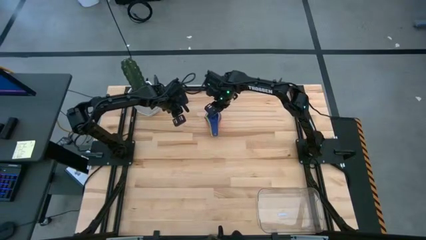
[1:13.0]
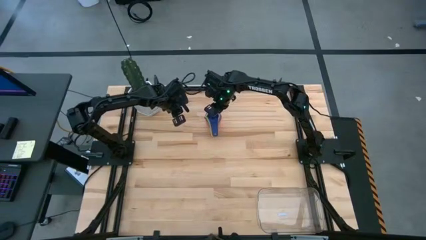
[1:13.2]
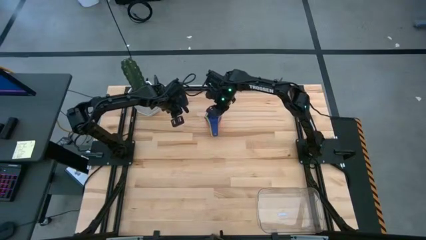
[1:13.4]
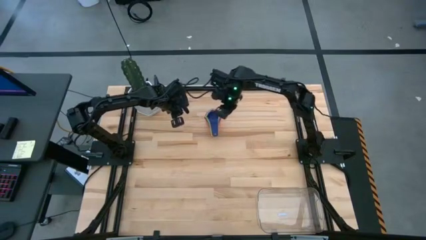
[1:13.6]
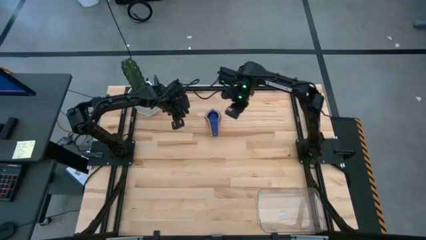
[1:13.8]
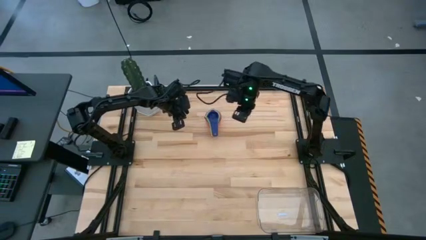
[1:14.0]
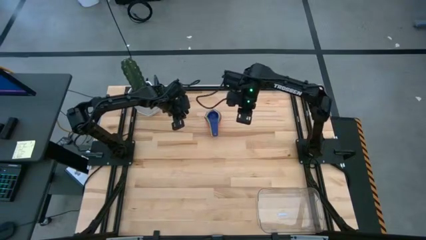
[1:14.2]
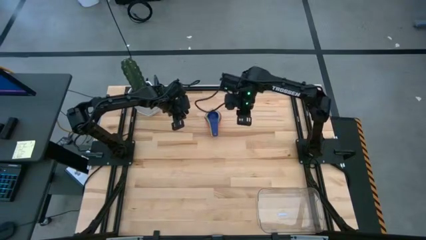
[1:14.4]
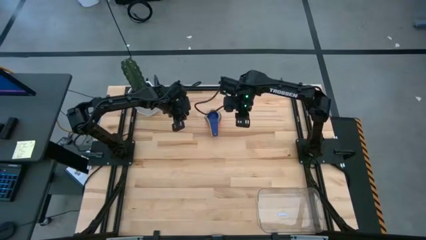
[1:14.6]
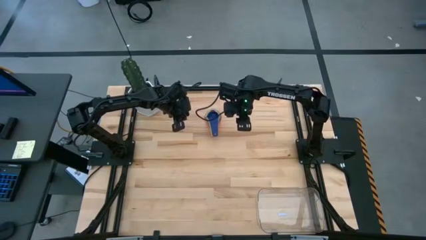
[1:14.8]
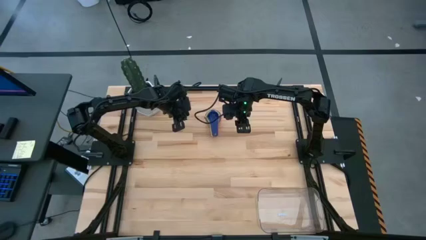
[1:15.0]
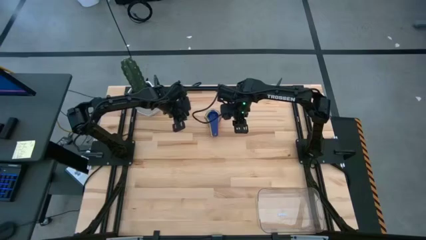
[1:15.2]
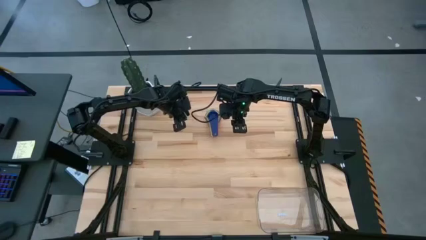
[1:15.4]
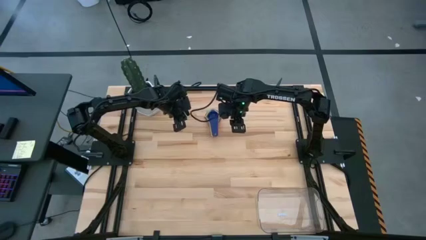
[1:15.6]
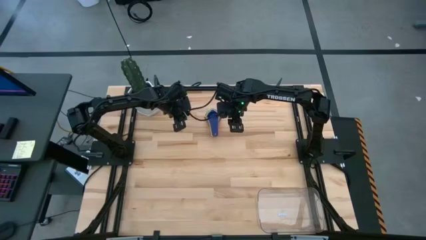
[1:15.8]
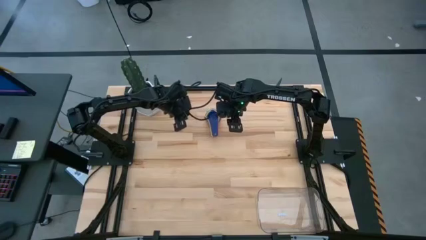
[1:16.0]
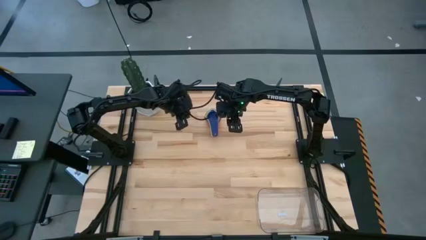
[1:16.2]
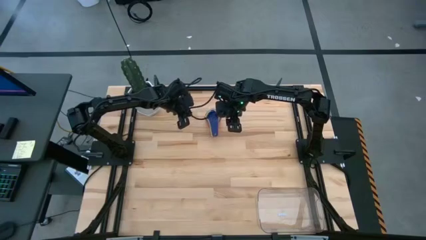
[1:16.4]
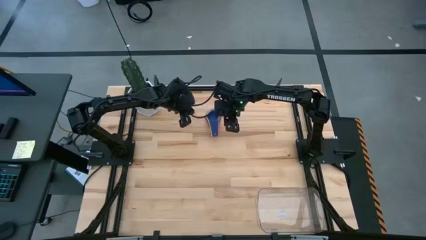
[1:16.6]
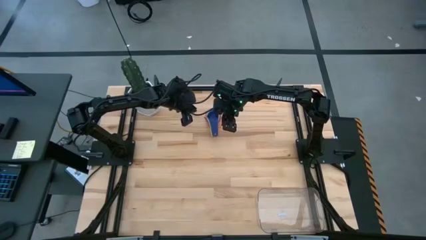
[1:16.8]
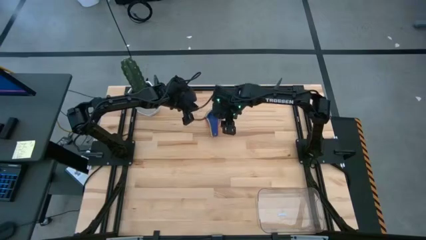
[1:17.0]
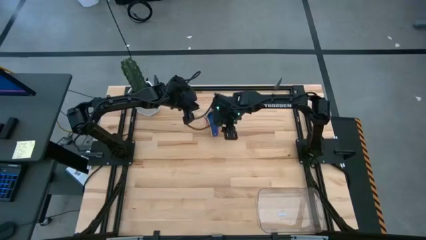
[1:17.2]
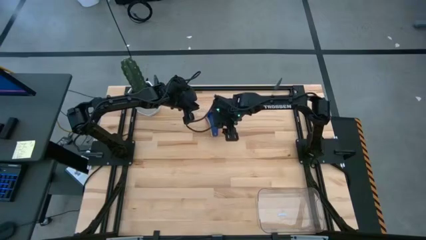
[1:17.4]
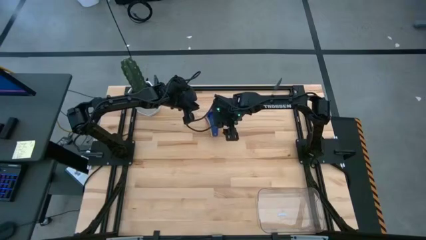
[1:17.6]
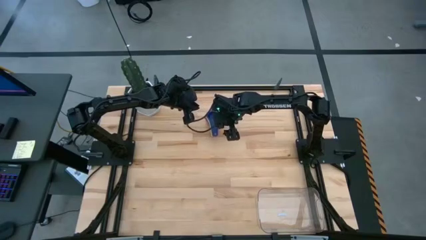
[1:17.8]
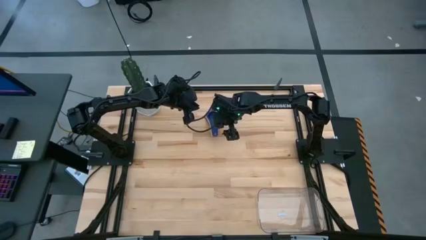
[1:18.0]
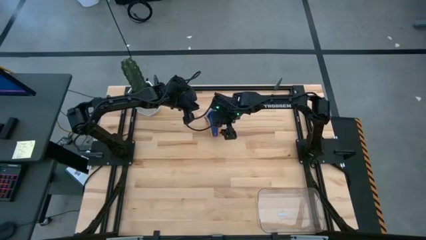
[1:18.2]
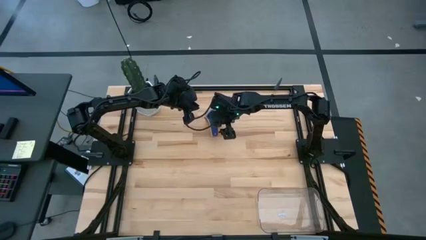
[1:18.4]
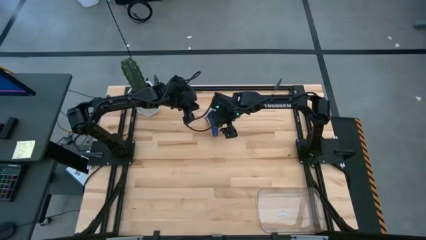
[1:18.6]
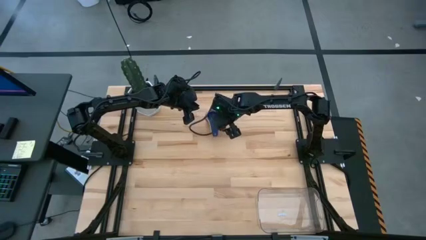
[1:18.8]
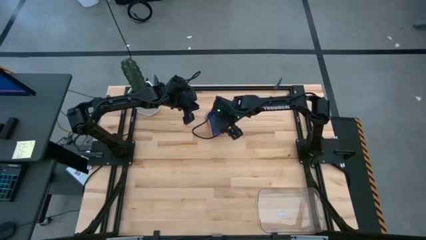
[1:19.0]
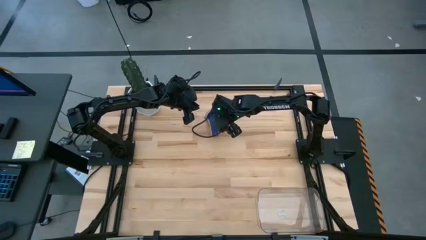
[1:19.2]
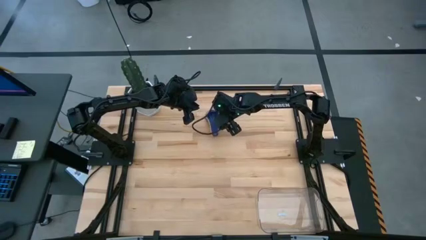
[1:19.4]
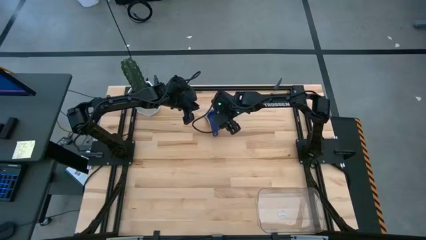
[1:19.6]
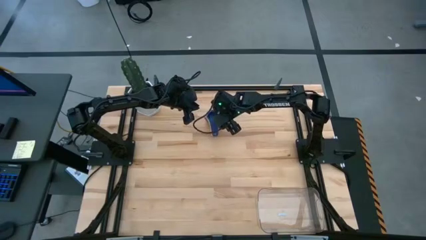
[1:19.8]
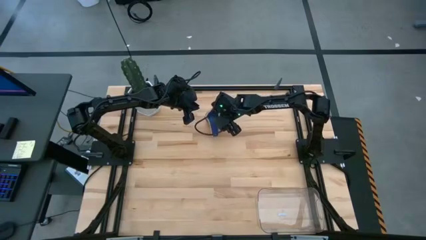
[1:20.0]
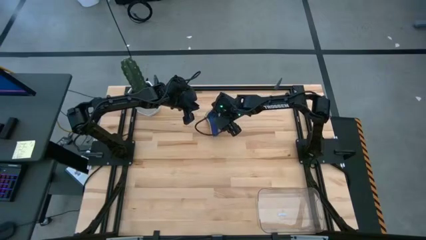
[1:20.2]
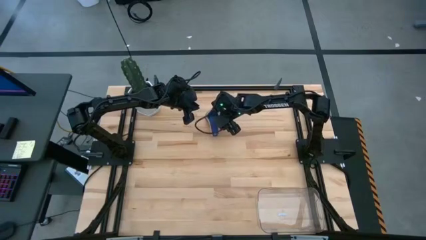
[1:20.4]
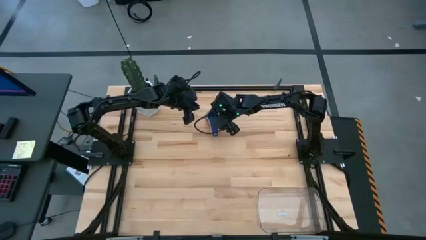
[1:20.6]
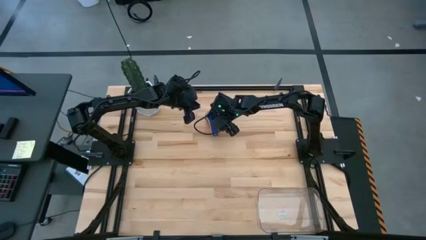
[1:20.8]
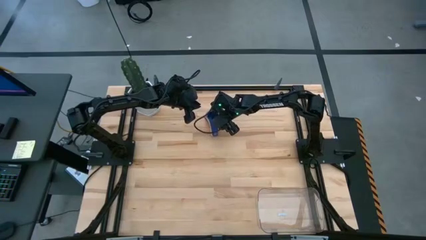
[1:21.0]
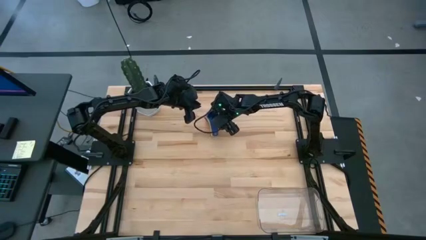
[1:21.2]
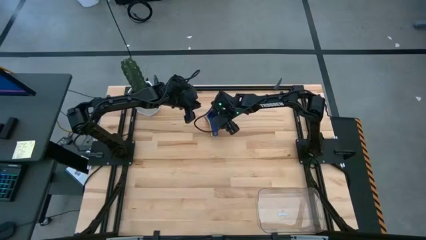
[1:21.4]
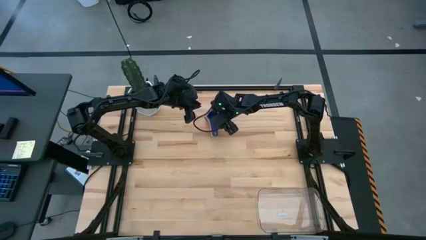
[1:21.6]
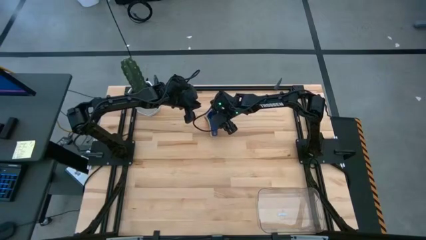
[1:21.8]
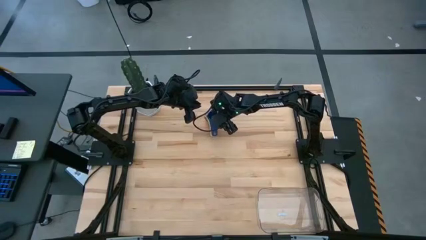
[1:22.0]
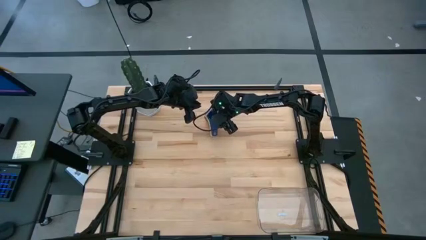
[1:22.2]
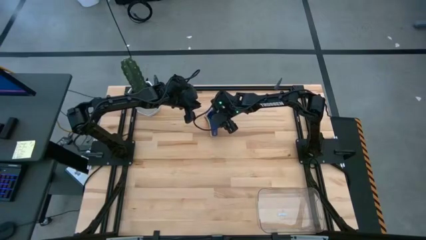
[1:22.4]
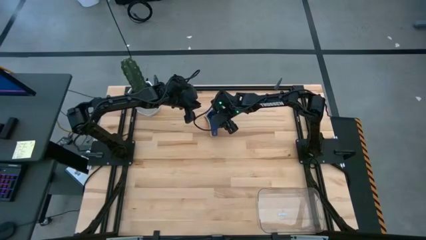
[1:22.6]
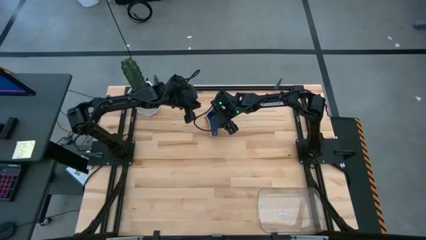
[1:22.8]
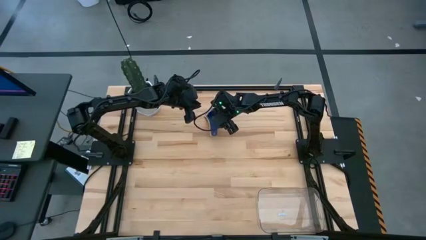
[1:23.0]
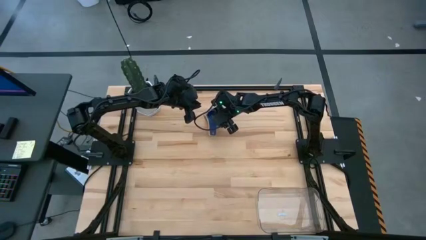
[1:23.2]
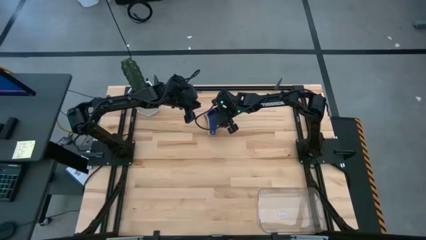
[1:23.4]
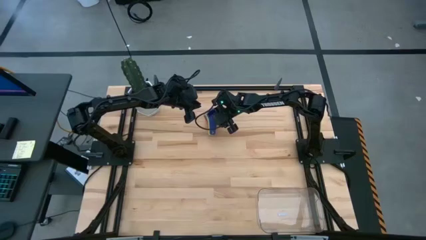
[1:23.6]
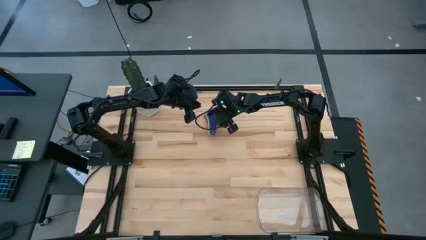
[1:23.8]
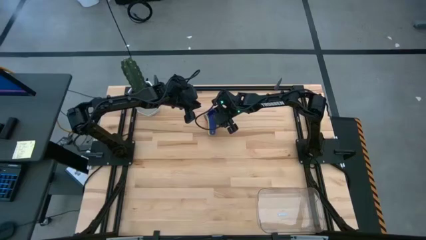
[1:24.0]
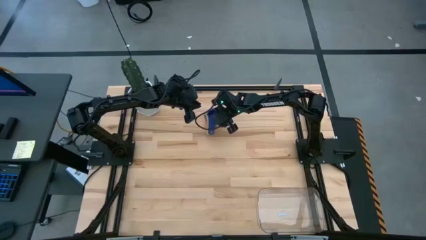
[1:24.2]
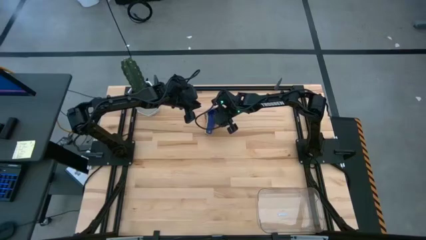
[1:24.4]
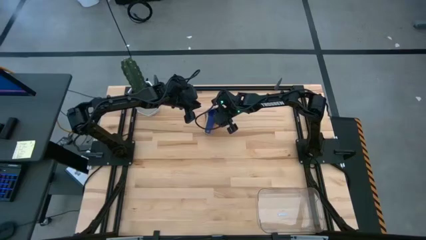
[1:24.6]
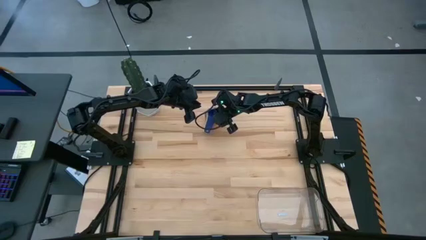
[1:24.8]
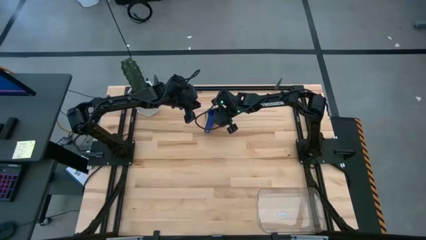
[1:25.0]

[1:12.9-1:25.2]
Task: Nest measuring cups in basket
Put the stacked measuring cups into the transparent bin

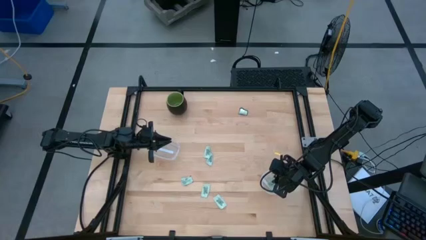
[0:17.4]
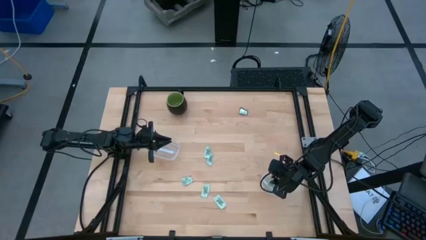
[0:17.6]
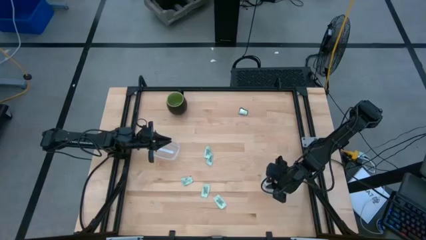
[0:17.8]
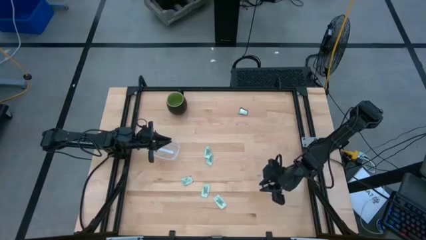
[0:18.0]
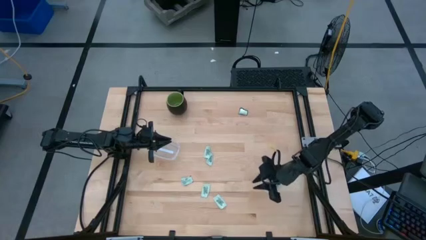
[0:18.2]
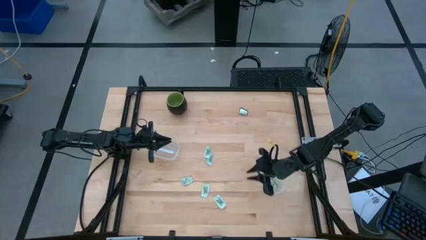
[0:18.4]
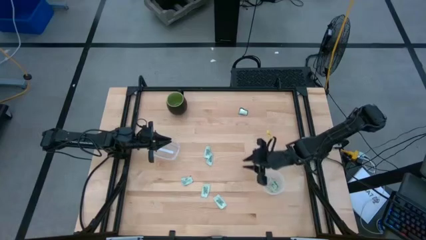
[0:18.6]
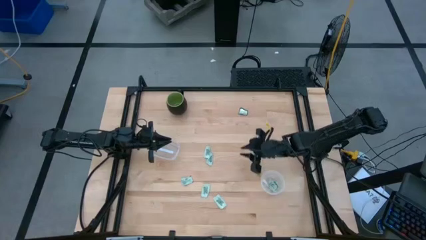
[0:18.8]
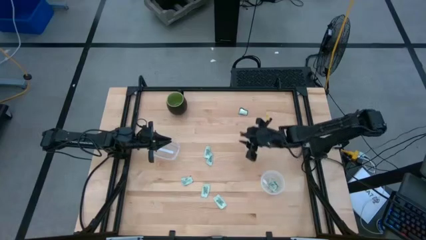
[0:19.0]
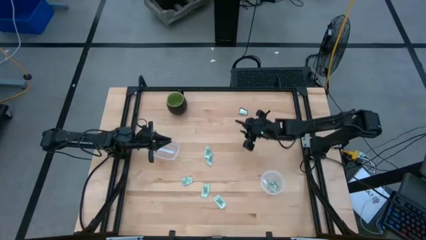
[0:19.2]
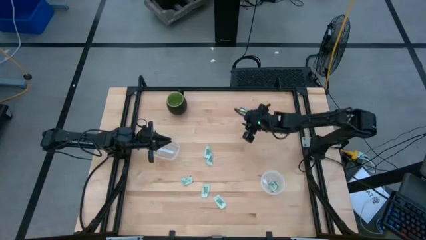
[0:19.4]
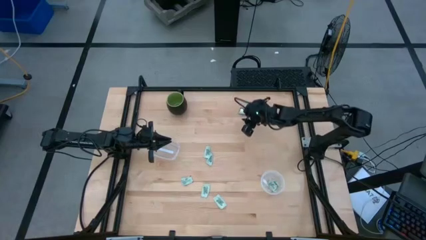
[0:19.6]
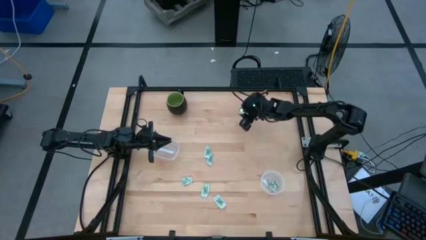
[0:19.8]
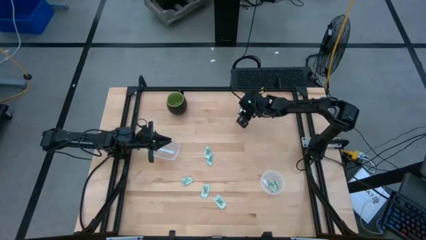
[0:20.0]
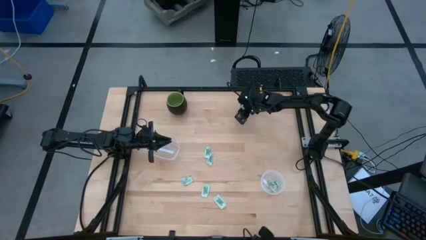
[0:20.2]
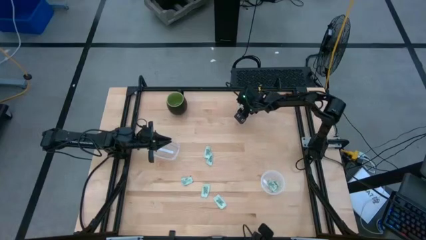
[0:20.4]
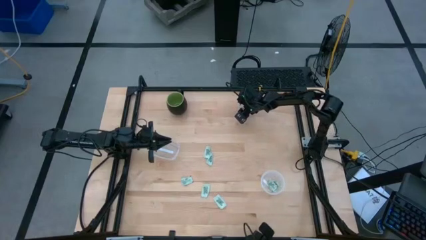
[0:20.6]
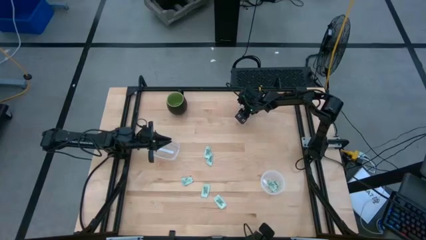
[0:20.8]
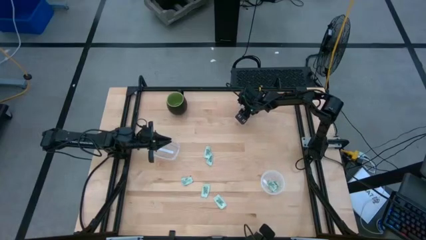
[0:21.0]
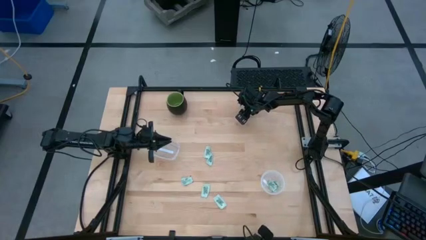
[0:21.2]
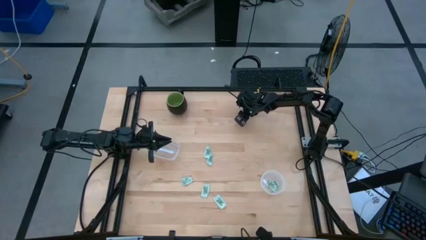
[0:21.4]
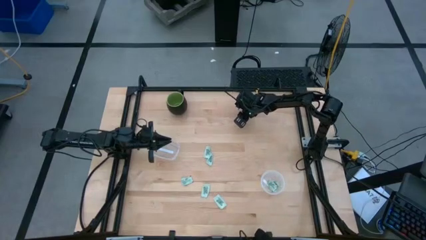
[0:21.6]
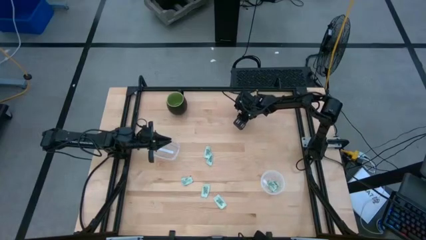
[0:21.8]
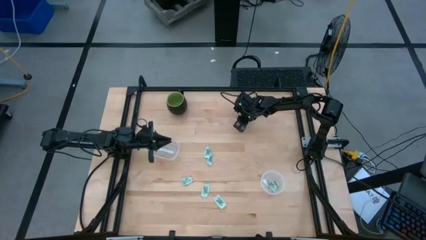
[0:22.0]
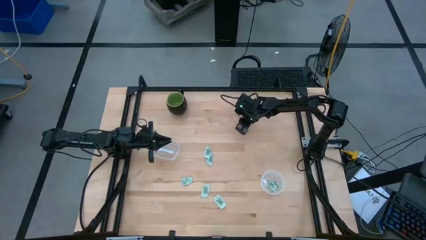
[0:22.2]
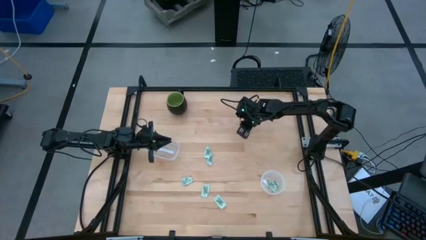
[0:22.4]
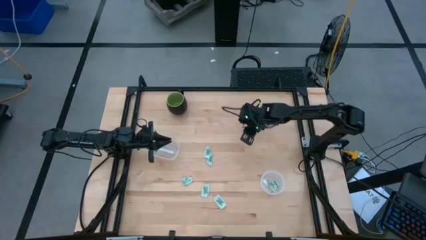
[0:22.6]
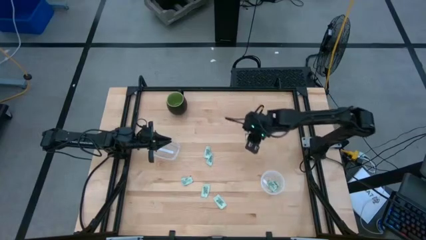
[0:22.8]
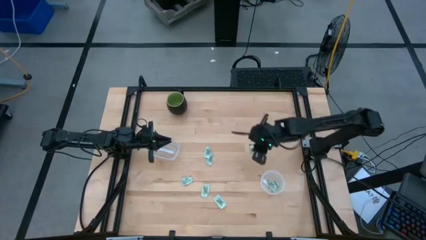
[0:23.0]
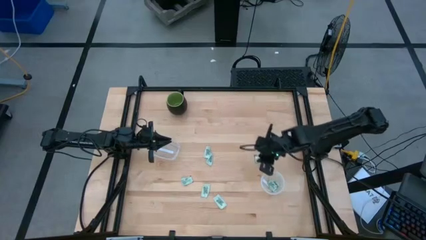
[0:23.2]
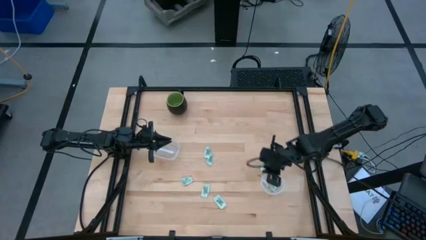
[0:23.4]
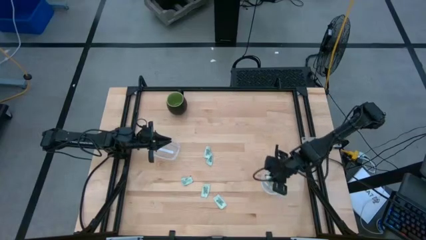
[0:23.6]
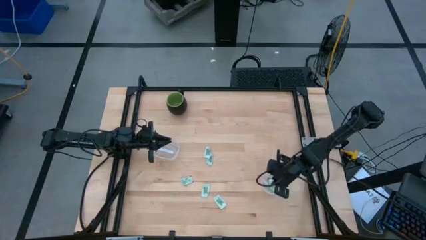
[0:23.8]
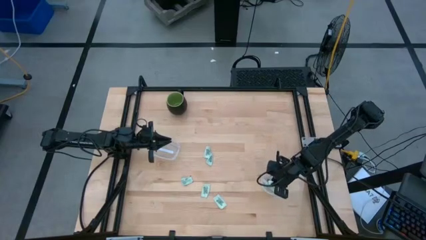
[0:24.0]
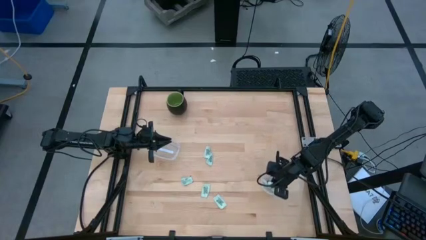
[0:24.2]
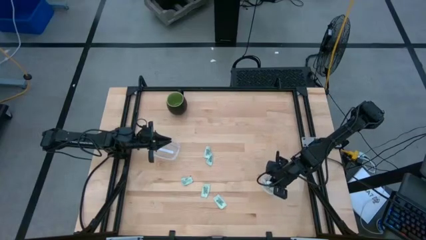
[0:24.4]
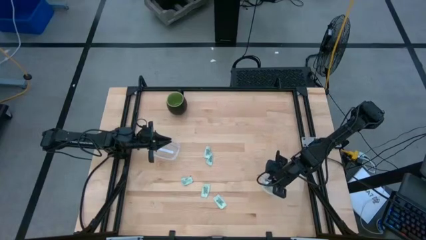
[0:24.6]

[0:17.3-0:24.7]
Task: Pick and place Stevia / Truvia into bins
Put the green stevia packet into the right transparent container
